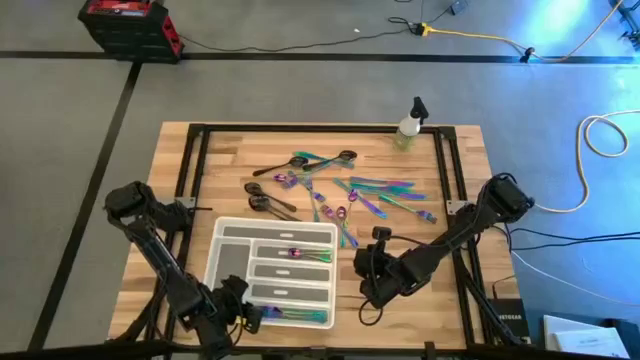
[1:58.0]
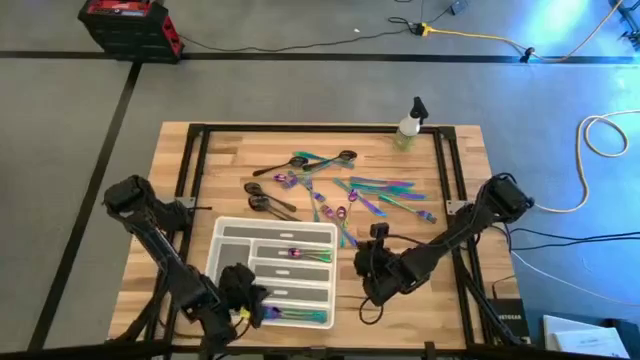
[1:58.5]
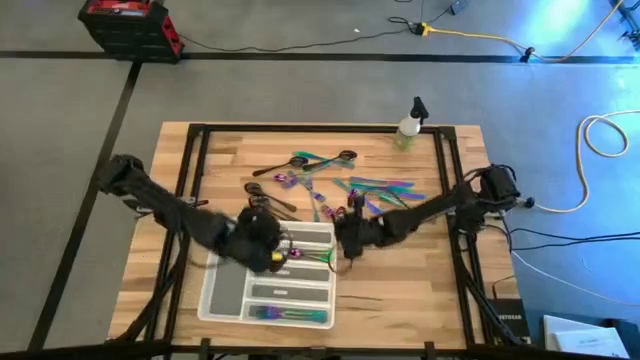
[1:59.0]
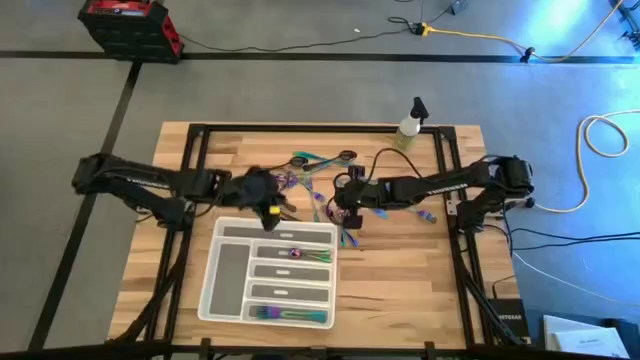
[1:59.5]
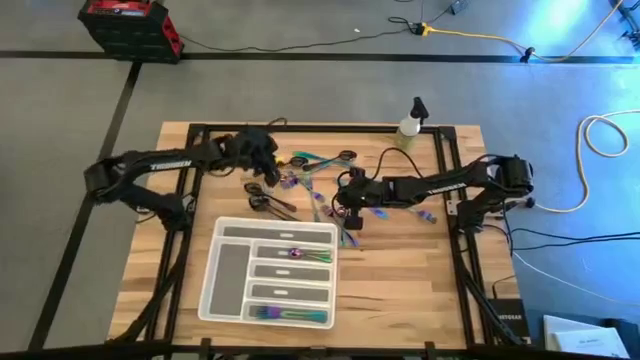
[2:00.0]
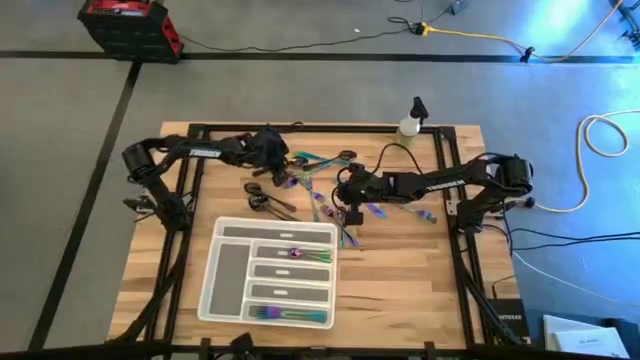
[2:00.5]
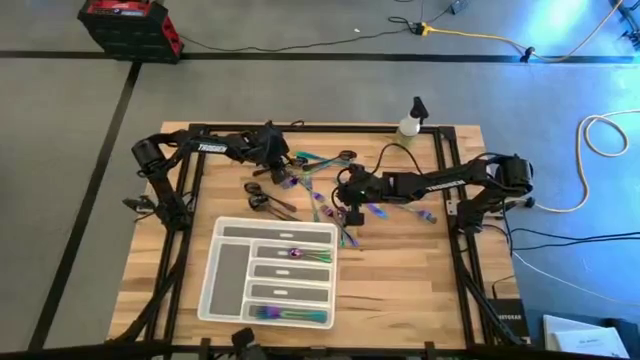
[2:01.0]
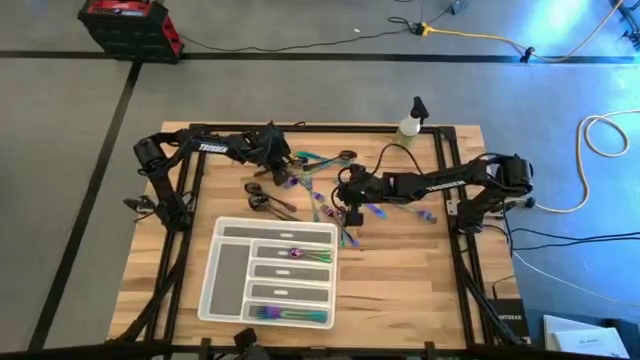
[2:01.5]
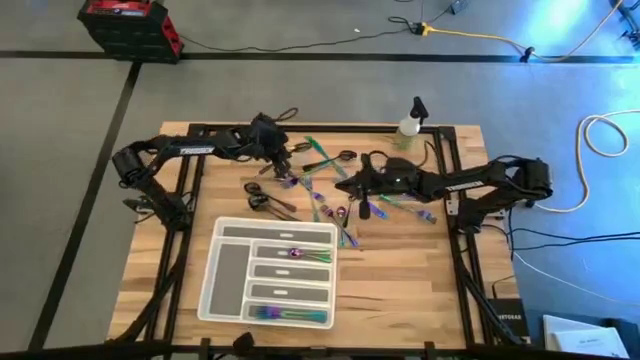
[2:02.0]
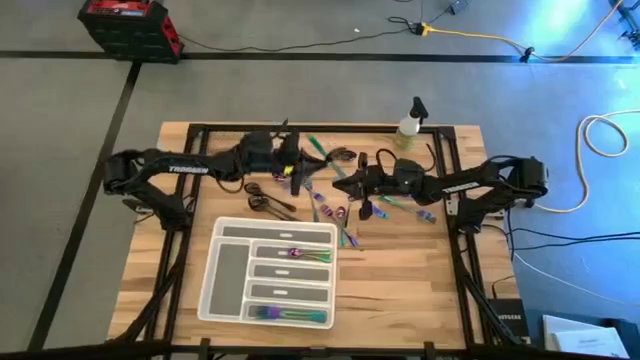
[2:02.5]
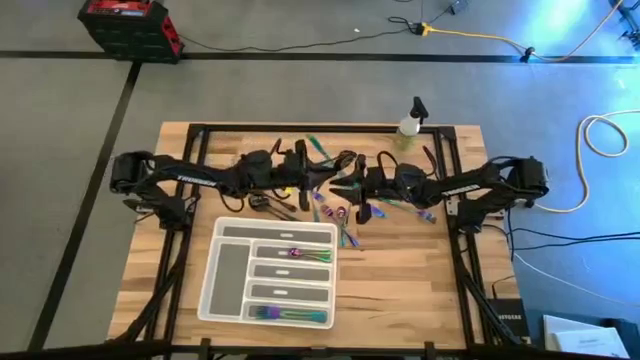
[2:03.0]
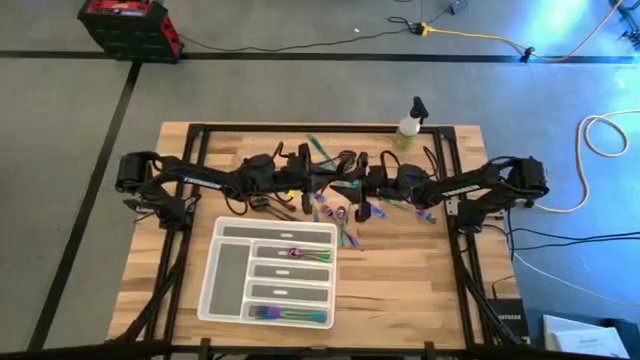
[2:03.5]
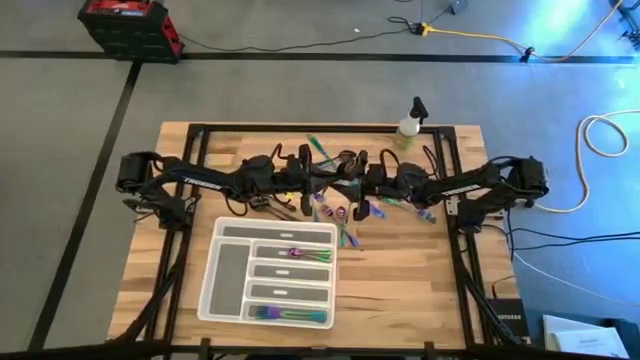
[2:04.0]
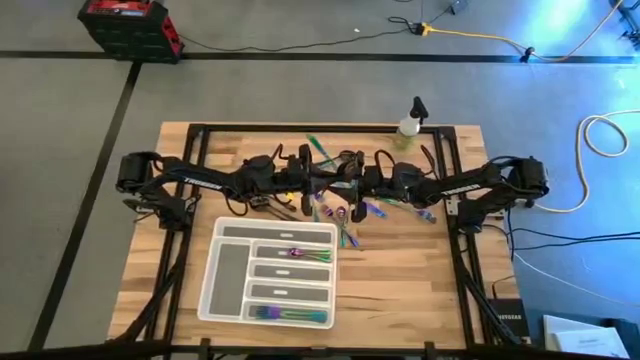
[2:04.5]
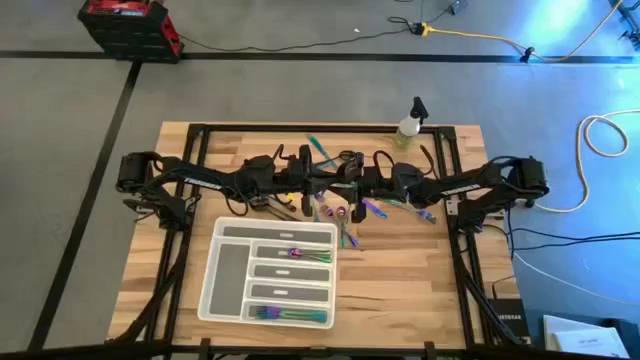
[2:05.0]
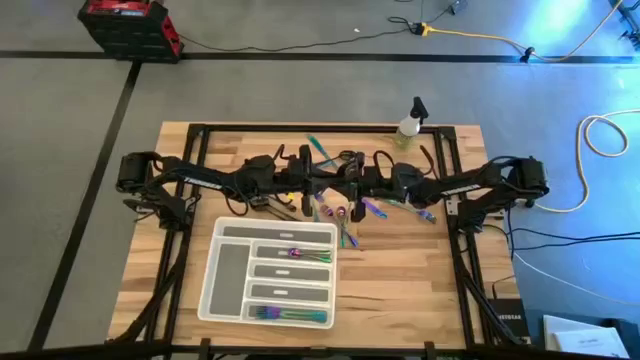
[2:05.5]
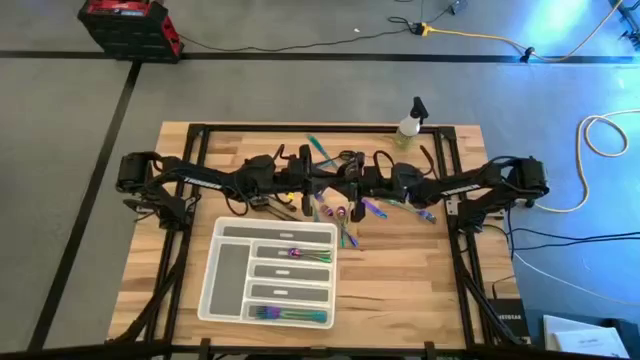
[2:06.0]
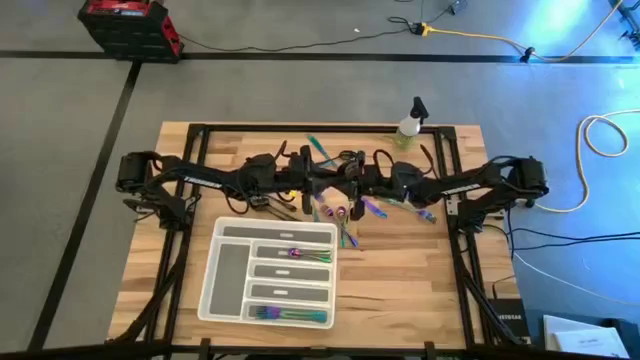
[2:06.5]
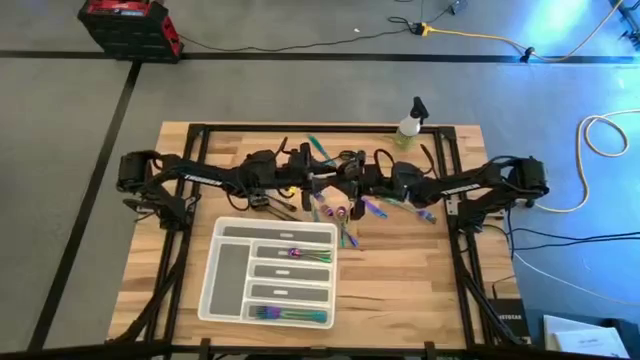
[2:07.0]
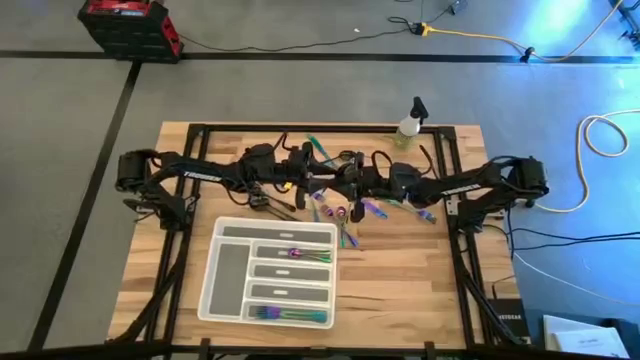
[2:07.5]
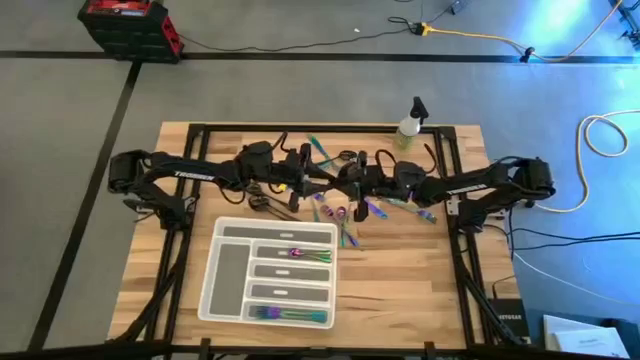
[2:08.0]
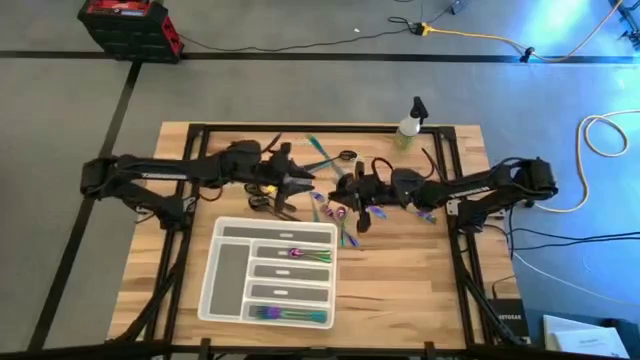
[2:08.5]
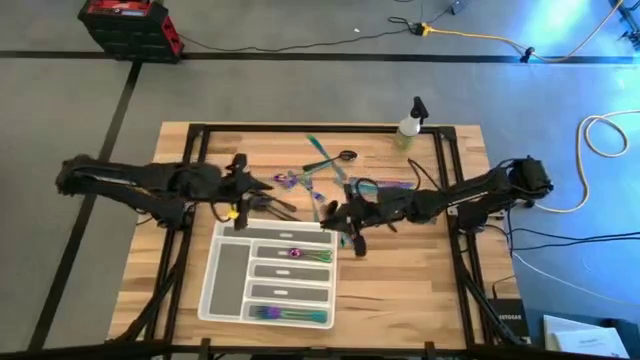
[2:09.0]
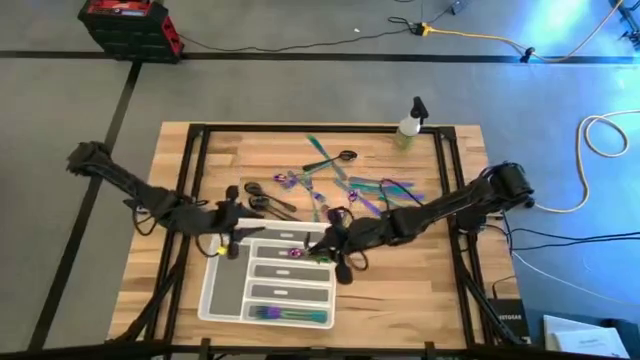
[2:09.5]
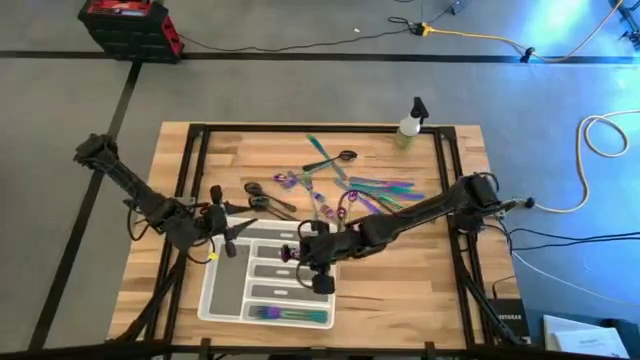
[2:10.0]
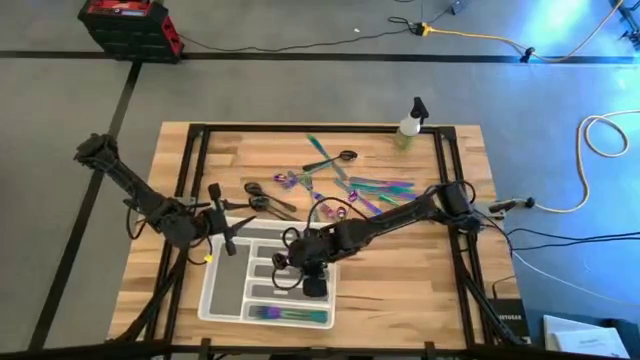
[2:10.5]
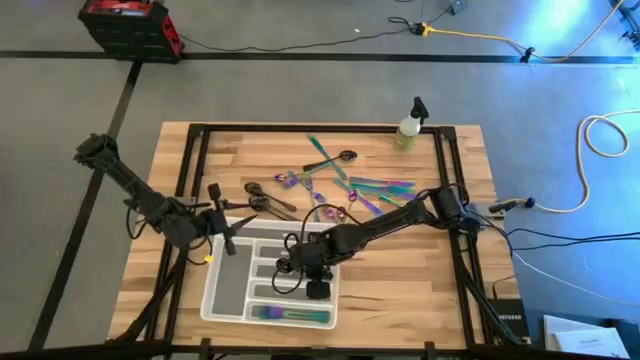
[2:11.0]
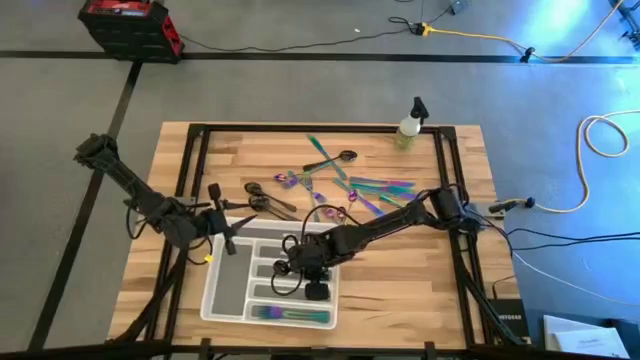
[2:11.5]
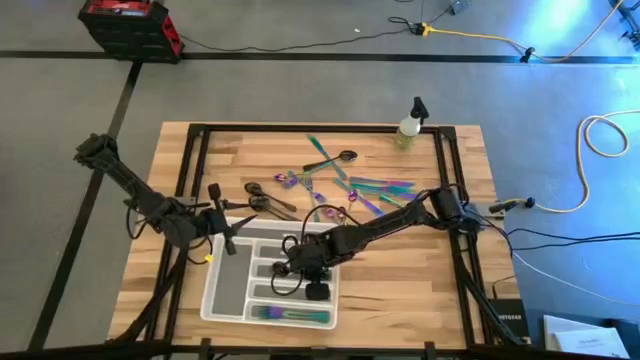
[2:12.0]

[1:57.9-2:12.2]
Task: Sort silverware
Put the black spoon into the white silverware tray

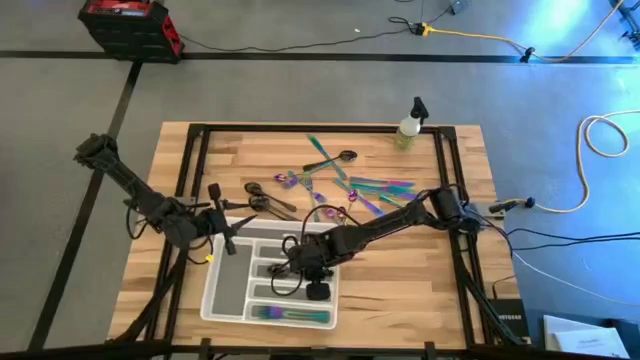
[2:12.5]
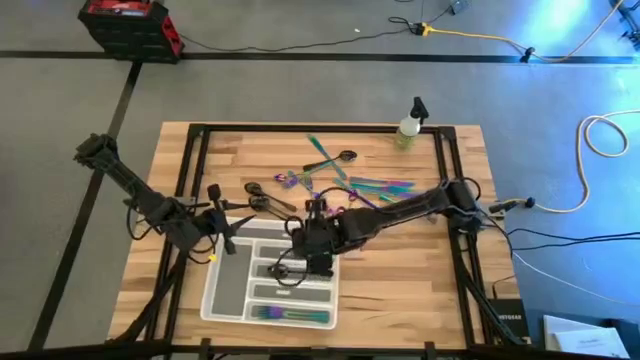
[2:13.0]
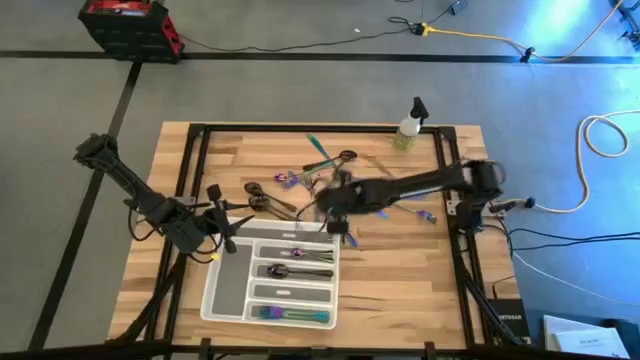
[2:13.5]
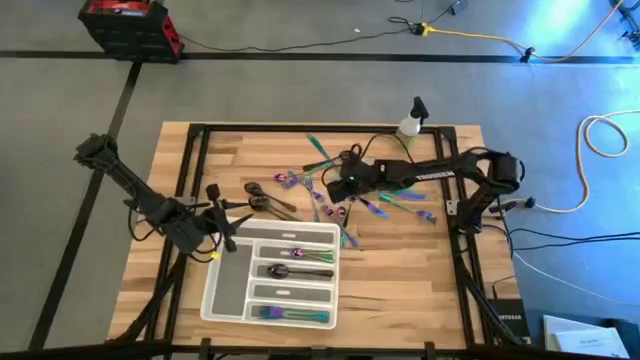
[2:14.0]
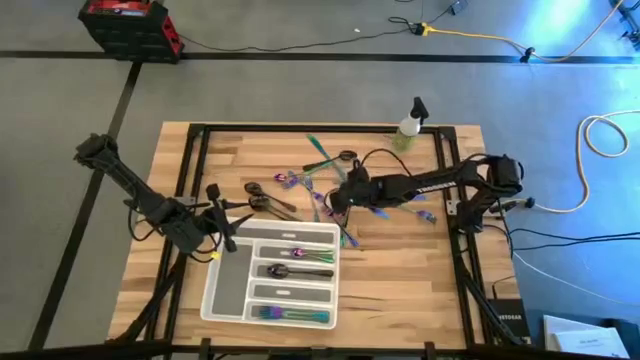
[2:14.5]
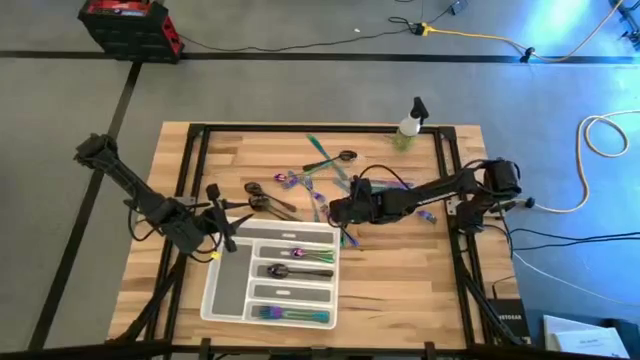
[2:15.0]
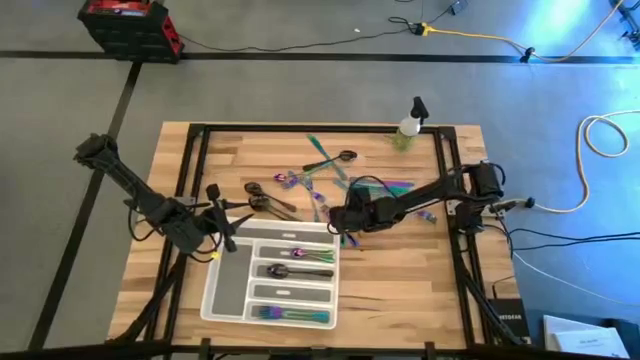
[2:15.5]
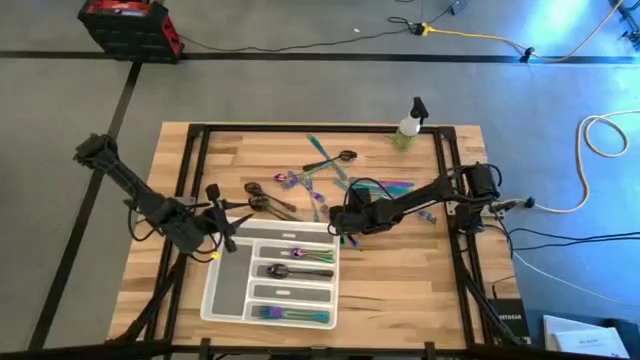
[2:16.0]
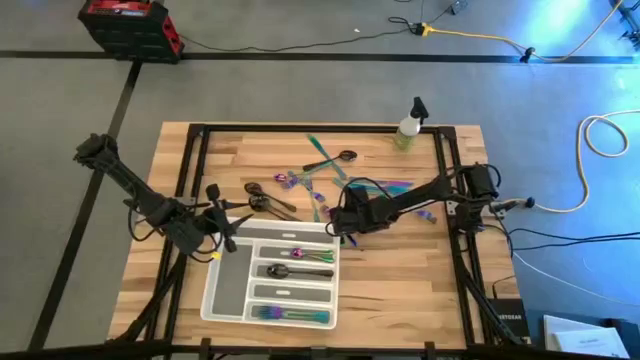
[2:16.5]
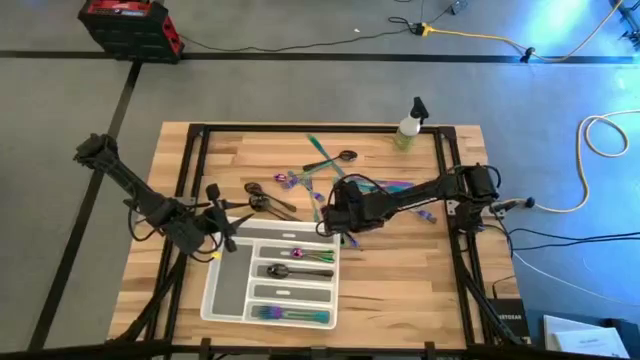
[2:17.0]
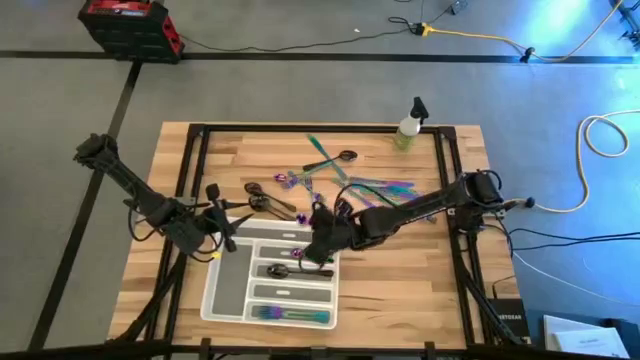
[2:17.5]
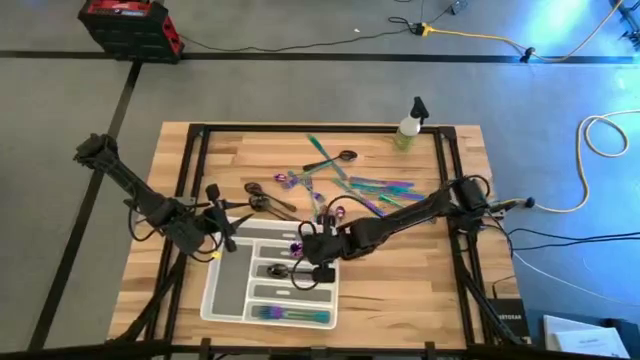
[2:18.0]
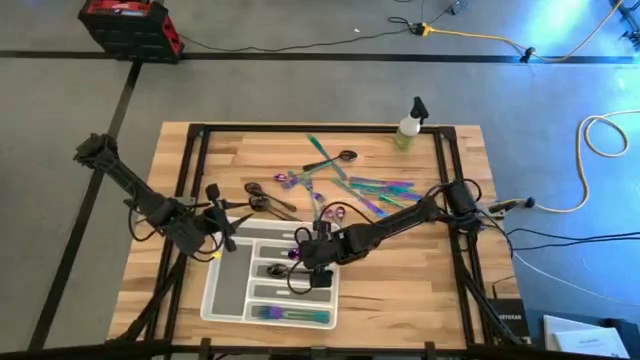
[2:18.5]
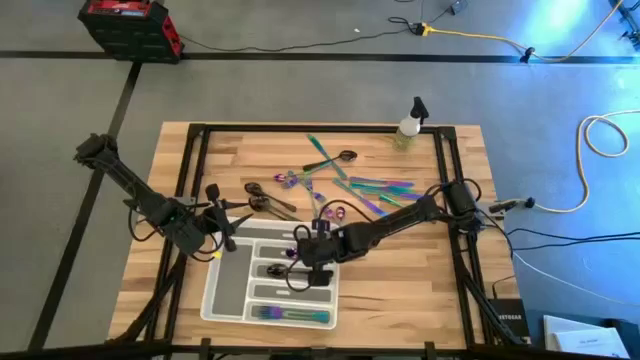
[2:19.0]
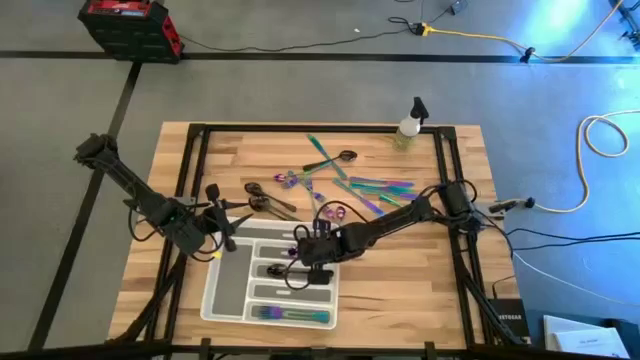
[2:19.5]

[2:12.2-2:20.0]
Put the blue spoon into the white silverware tray
